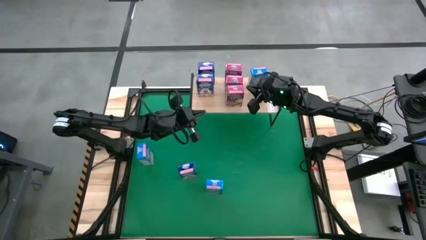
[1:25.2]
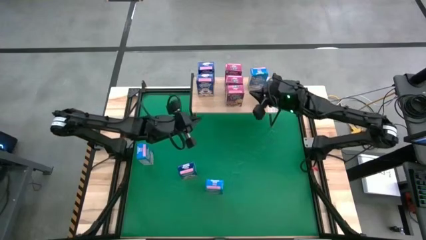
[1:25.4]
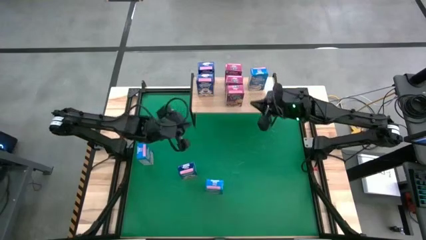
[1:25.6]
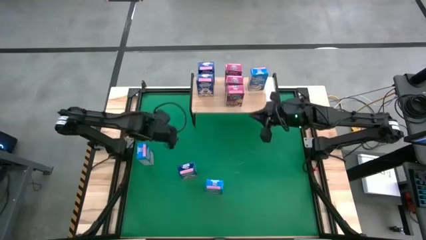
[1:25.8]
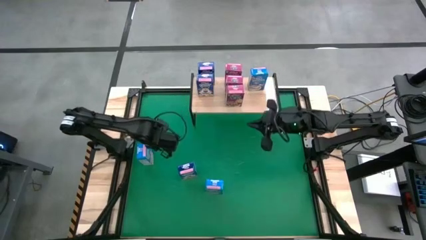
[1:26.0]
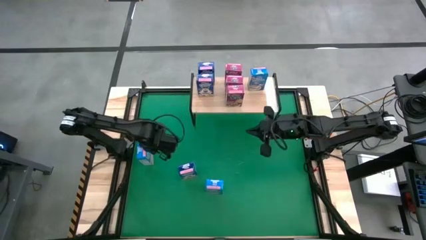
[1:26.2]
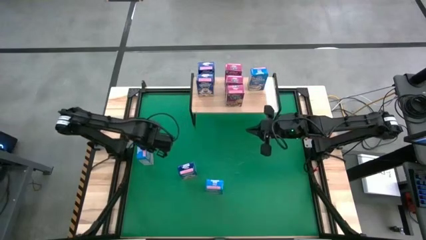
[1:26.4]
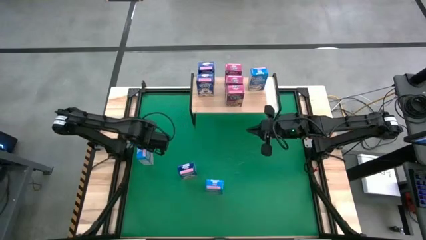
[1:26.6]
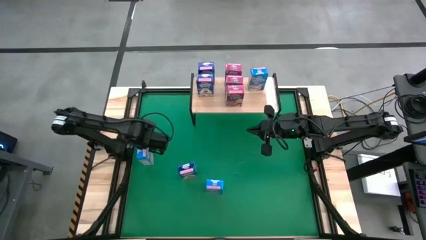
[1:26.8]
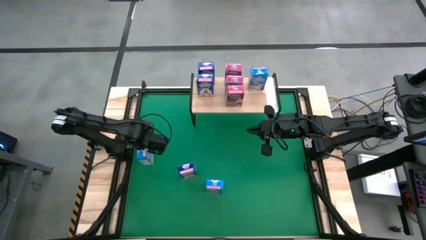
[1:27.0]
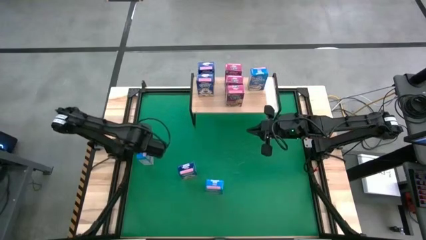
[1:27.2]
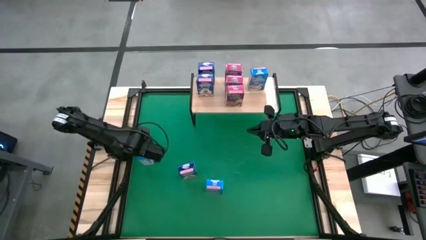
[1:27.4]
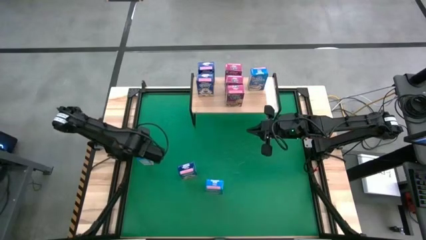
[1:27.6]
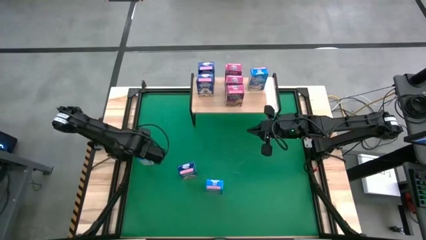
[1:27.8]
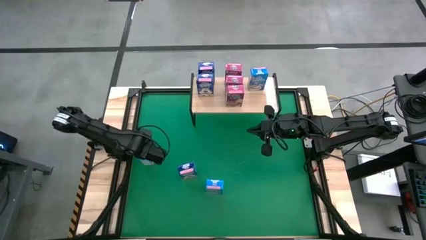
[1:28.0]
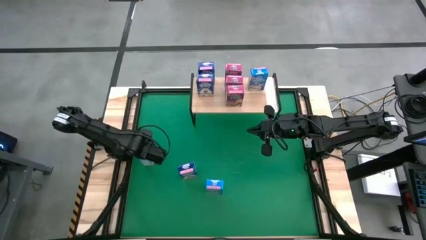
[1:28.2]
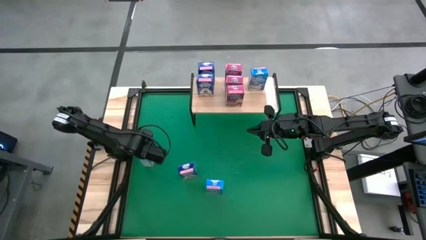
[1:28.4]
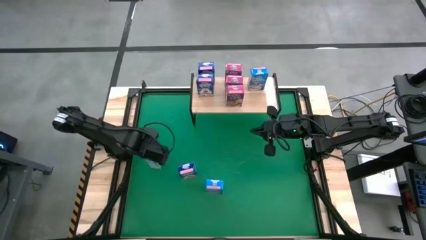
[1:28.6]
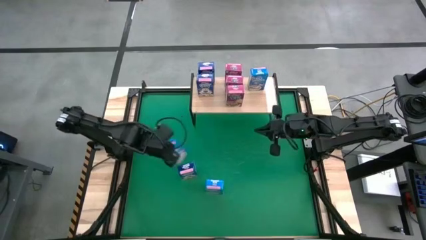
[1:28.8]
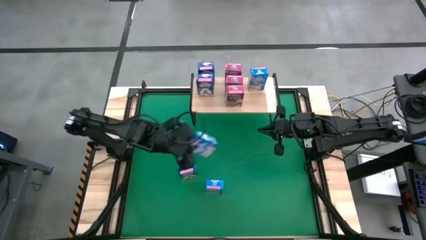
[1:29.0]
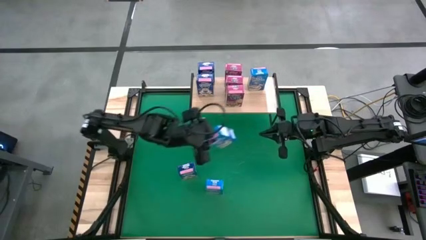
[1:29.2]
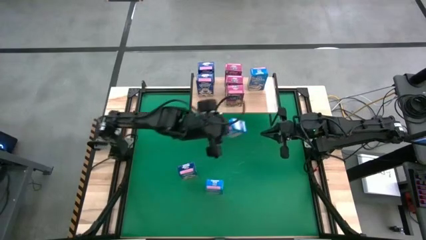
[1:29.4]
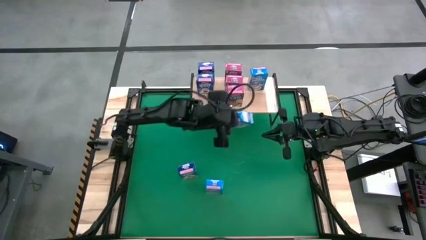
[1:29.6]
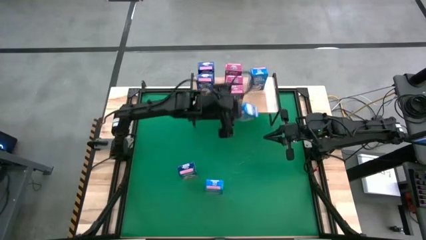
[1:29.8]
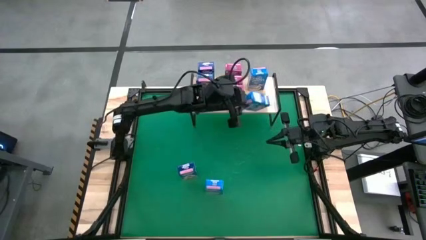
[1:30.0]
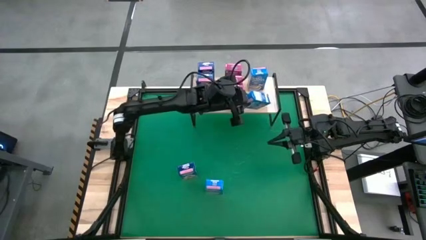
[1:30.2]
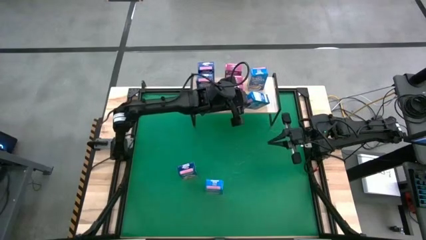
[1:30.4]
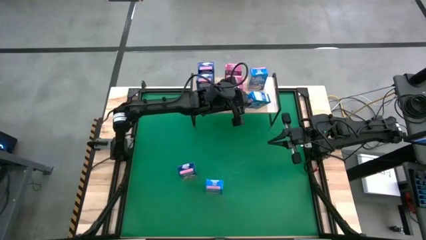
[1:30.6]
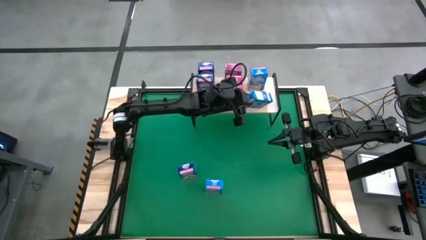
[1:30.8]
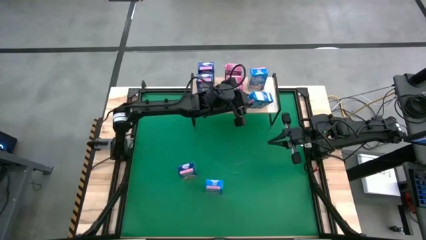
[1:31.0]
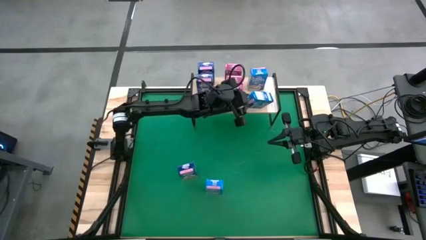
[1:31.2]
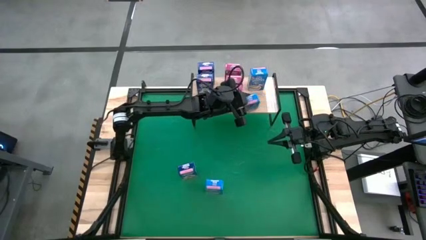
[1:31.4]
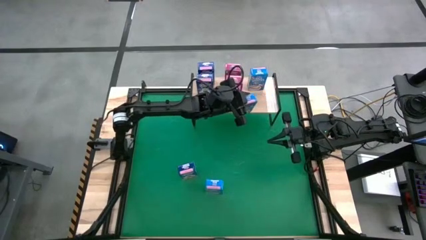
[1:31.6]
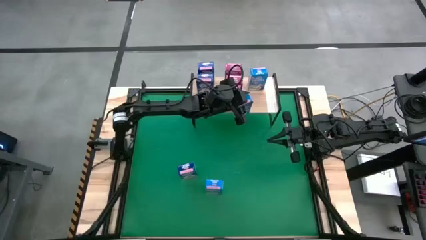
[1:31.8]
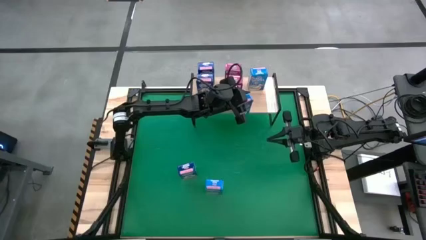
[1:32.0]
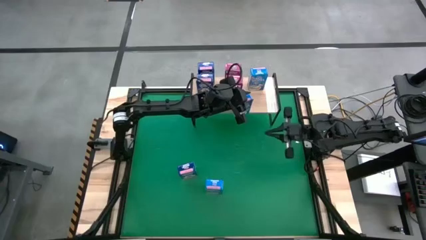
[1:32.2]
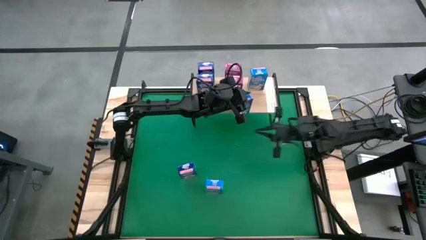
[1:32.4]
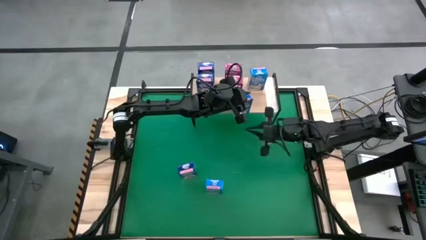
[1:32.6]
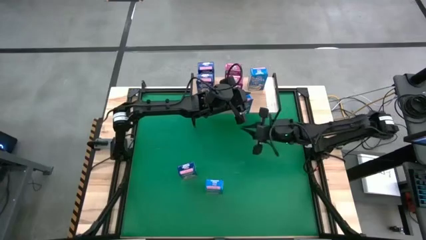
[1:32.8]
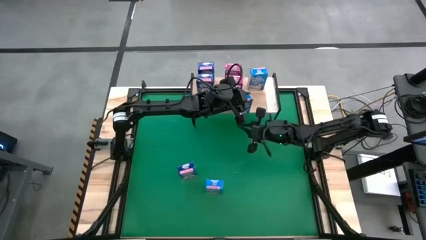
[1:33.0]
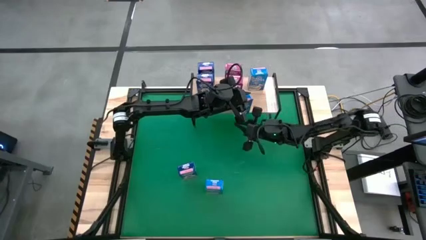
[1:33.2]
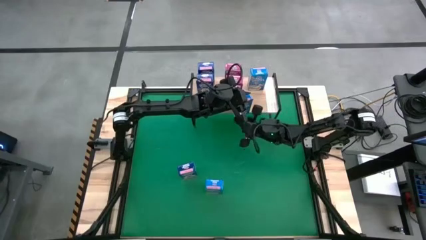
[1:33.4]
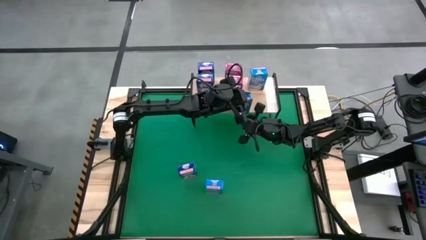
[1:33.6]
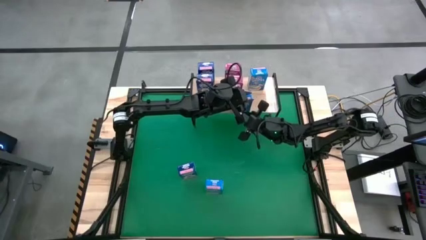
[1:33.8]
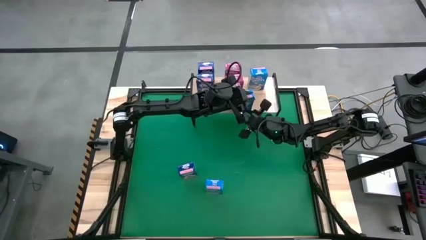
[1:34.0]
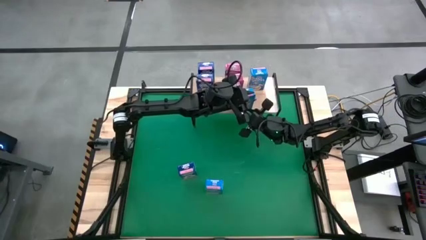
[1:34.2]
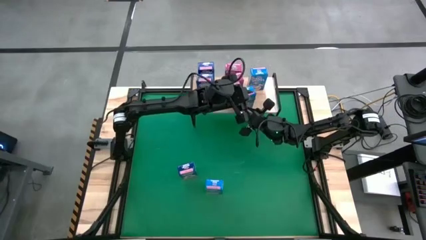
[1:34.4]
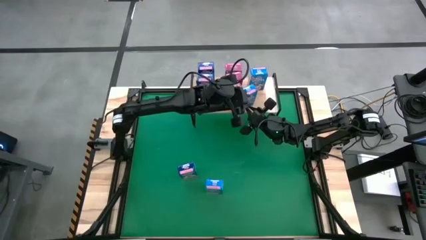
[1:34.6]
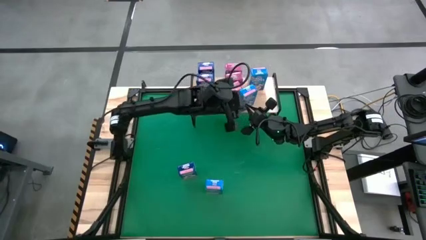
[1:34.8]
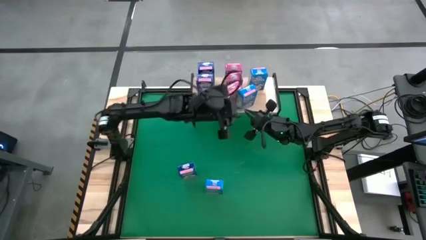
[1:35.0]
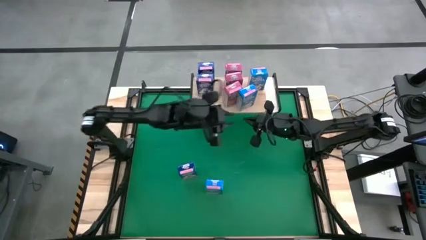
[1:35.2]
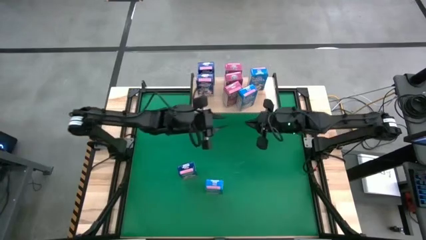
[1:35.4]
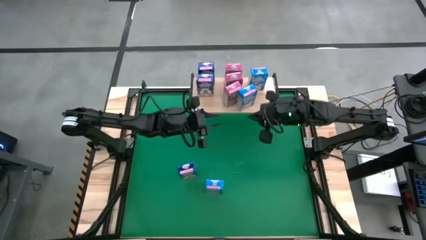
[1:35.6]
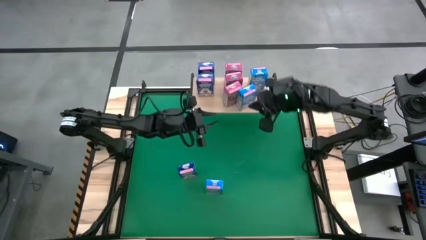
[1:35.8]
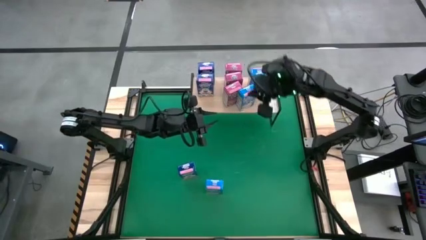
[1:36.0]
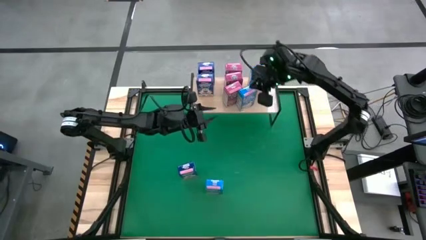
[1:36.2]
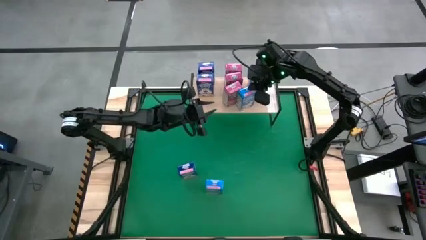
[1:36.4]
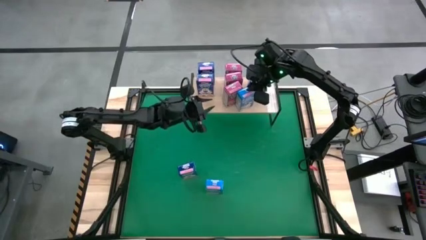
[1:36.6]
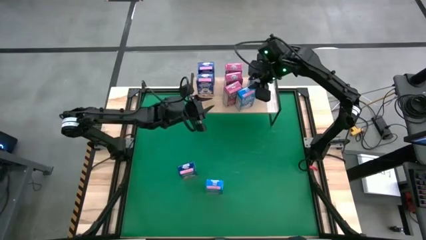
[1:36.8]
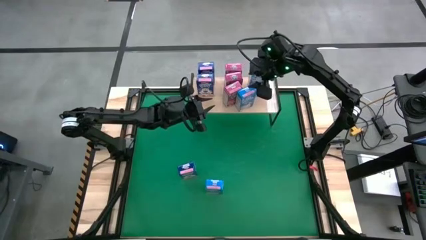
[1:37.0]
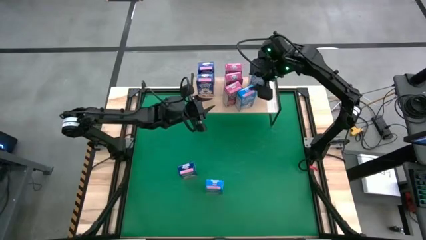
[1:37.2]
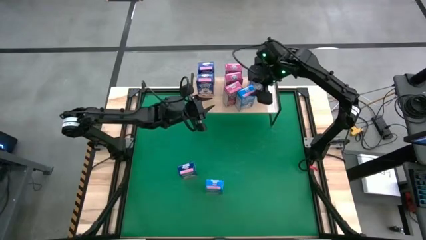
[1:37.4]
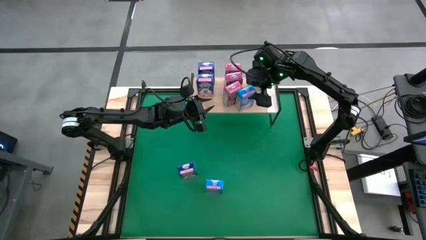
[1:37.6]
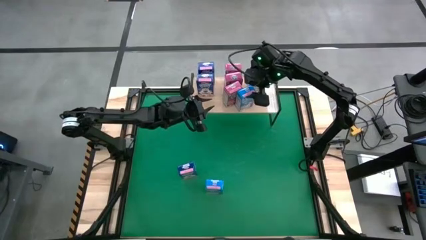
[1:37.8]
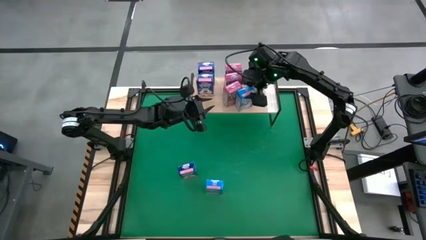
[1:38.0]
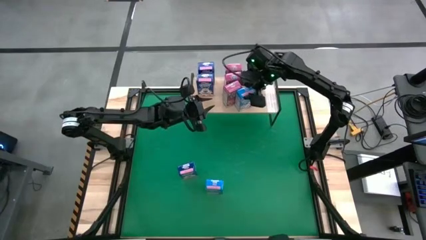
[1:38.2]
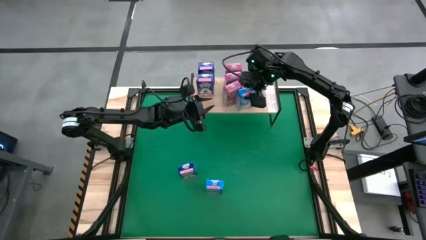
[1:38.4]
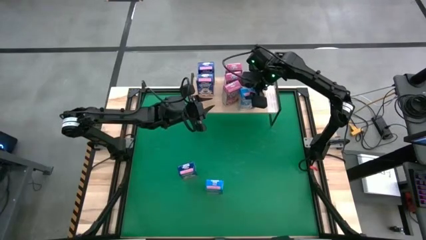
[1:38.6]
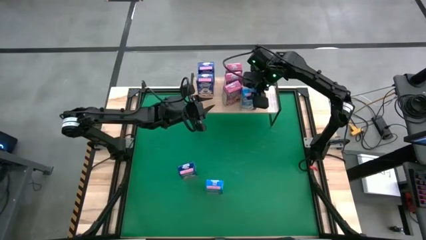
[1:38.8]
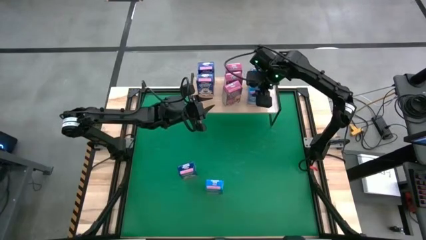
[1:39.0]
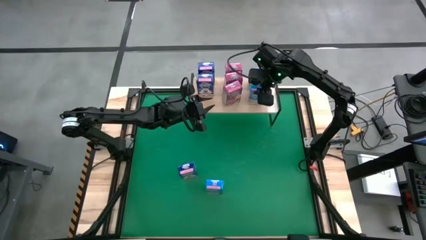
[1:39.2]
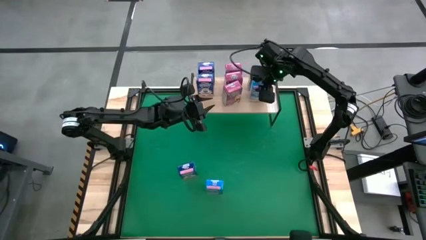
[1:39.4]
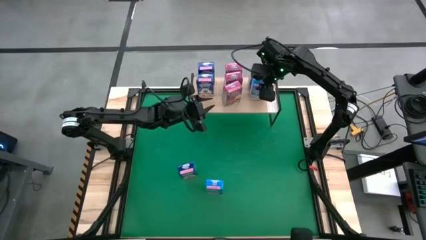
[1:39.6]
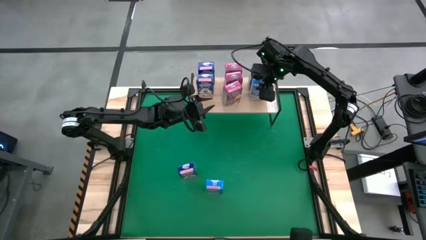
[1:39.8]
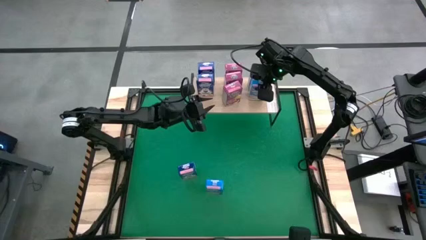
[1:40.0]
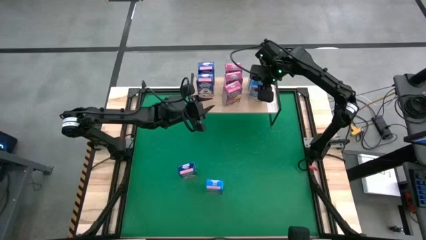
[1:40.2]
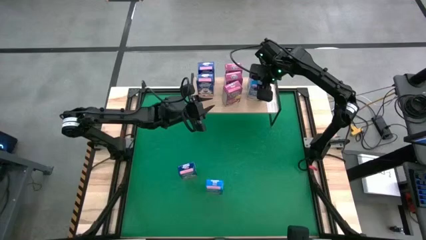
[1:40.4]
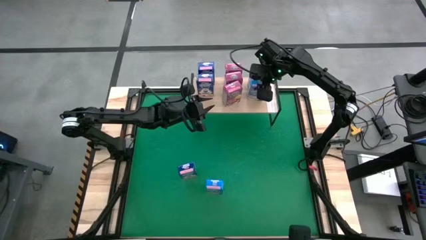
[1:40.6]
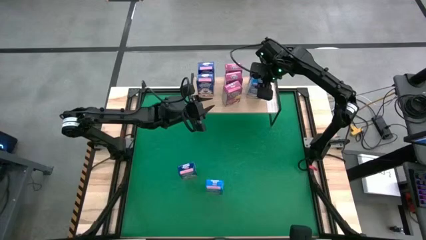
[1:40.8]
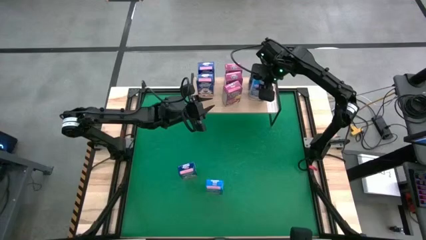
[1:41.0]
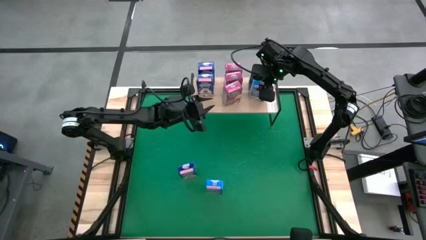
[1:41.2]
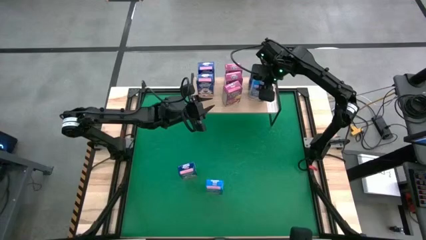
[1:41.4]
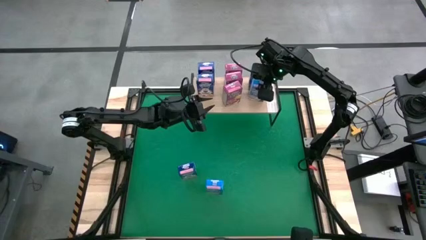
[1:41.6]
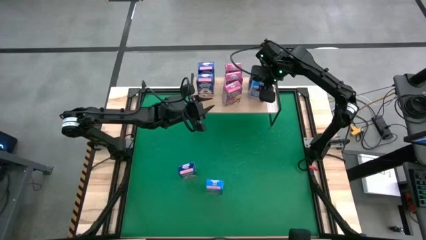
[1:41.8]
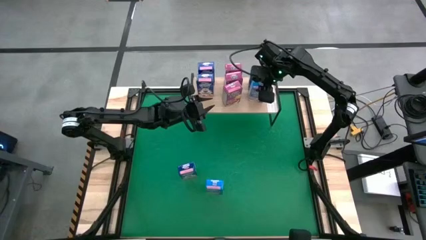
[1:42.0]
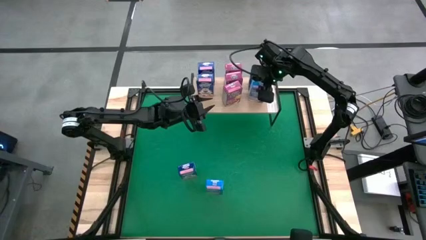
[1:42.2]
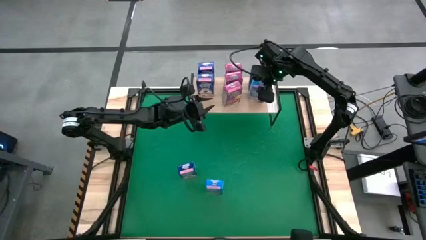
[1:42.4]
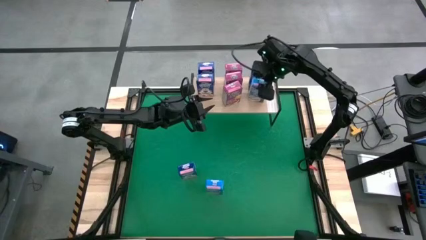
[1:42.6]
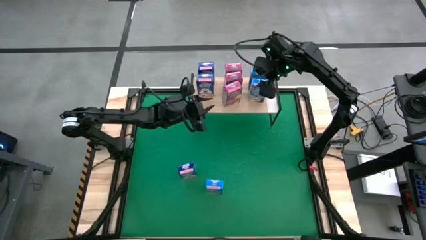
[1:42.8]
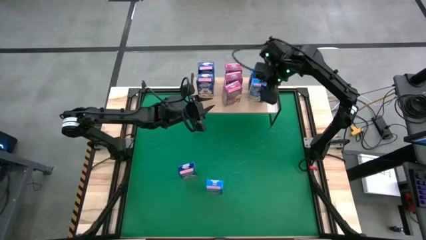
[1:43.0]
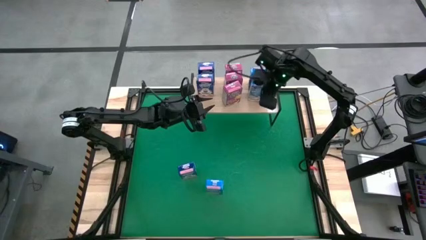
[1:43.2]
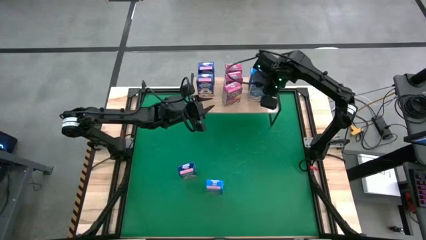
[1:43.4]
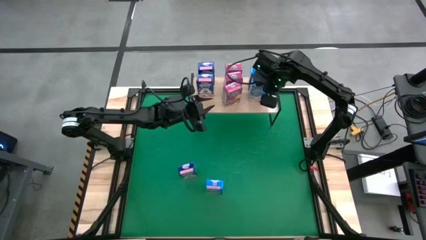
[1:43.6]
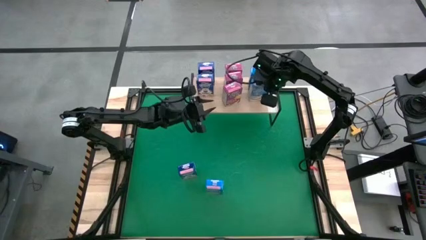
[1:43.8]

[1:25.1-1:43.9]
Task: Stack cereal on shelf
Put the left light blue cereal on the shelf aligned with the other light blue cereal box
